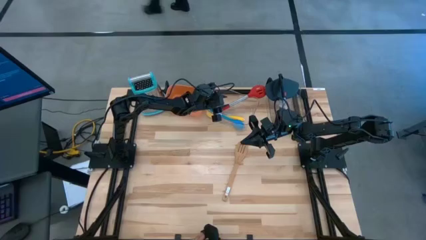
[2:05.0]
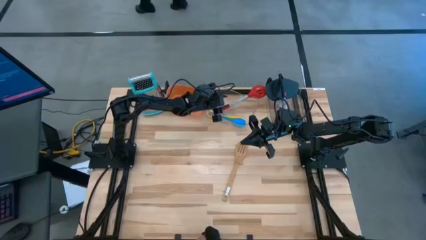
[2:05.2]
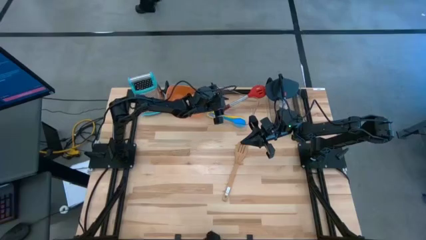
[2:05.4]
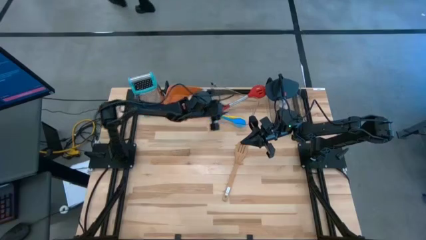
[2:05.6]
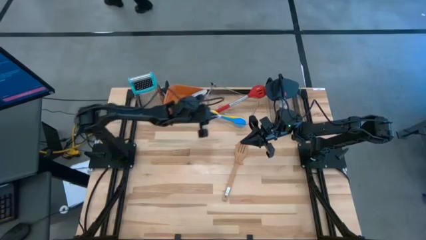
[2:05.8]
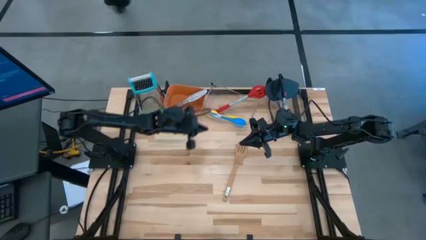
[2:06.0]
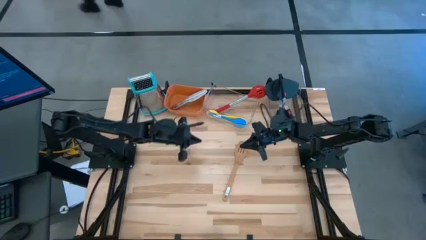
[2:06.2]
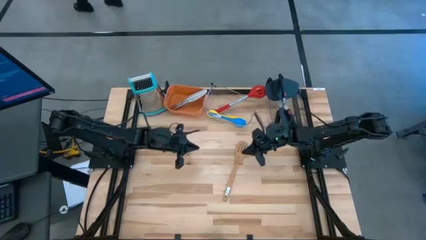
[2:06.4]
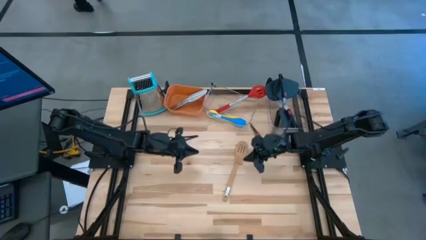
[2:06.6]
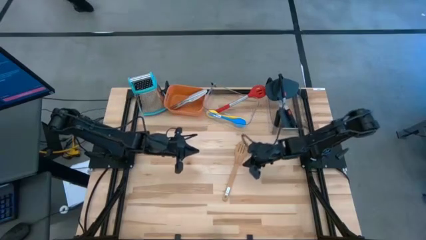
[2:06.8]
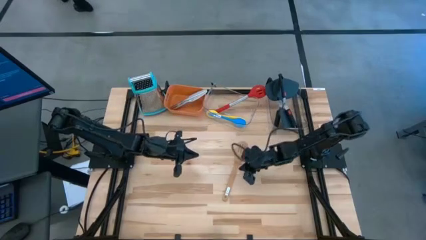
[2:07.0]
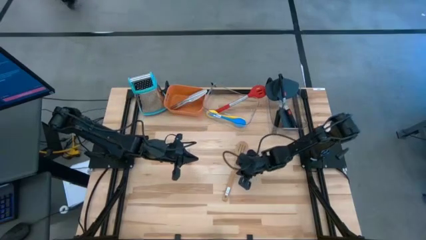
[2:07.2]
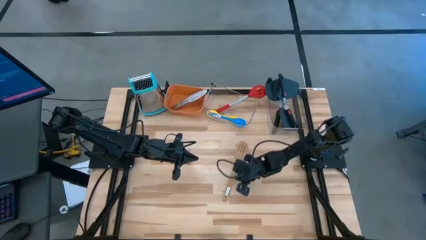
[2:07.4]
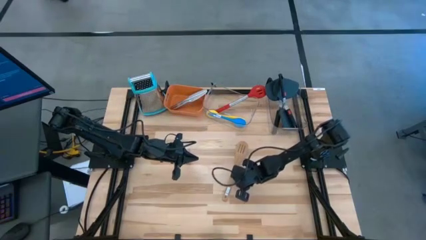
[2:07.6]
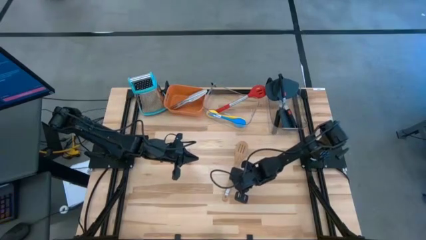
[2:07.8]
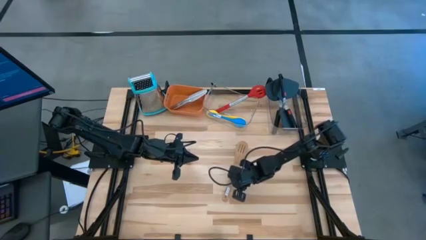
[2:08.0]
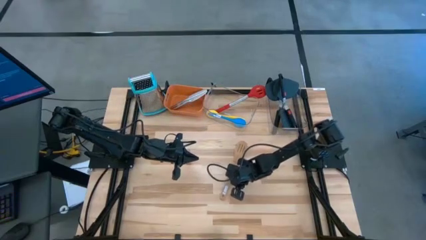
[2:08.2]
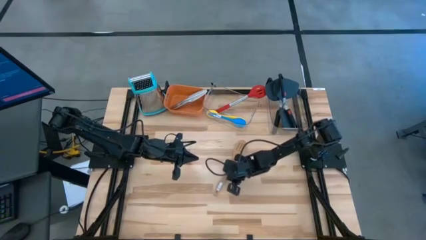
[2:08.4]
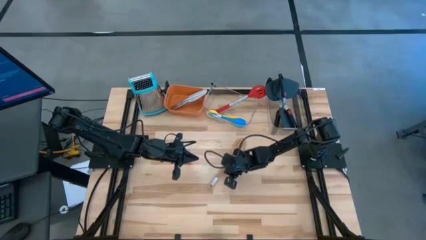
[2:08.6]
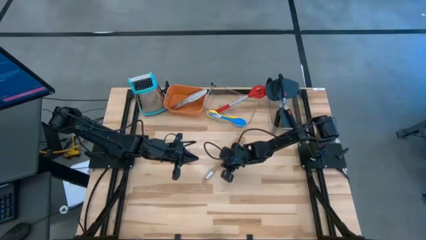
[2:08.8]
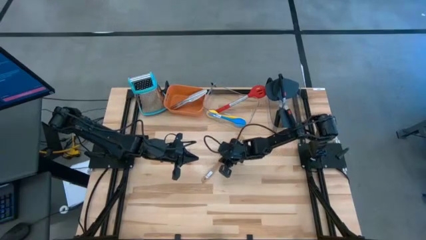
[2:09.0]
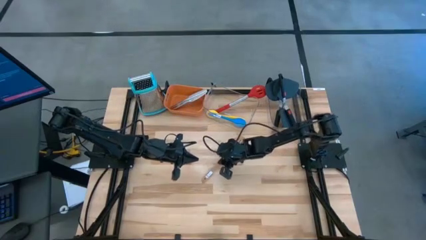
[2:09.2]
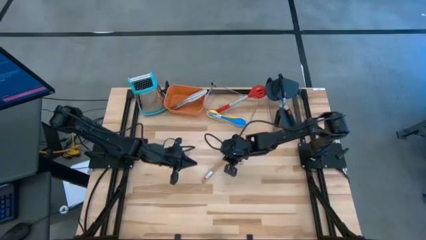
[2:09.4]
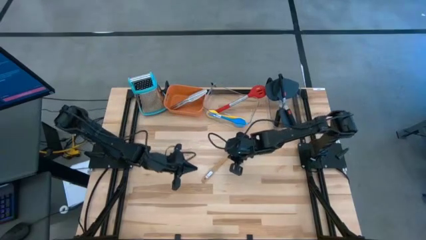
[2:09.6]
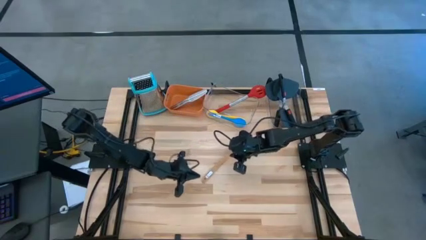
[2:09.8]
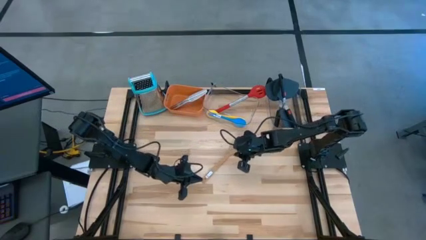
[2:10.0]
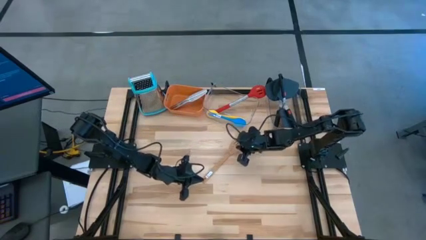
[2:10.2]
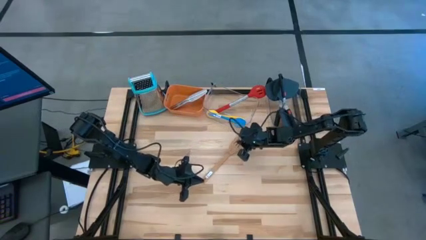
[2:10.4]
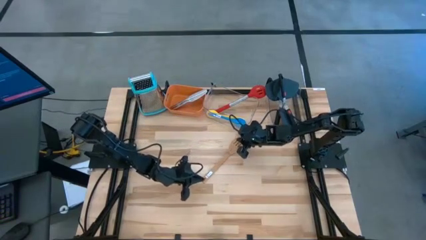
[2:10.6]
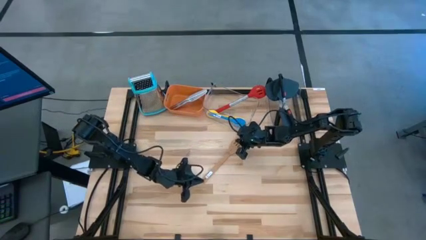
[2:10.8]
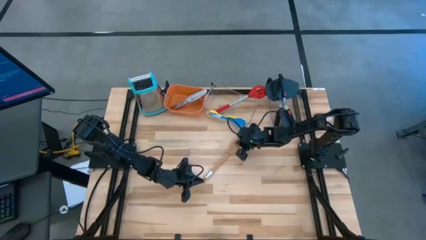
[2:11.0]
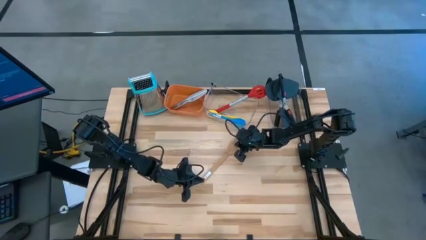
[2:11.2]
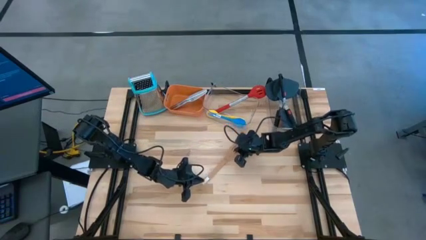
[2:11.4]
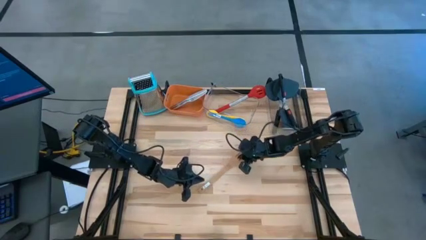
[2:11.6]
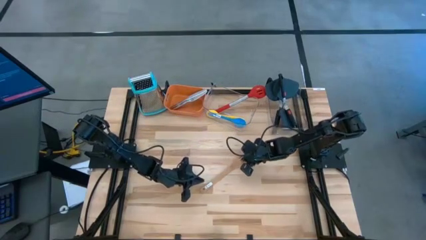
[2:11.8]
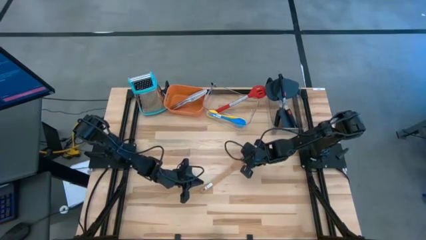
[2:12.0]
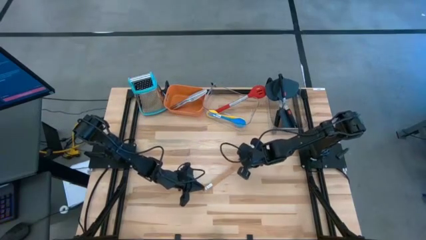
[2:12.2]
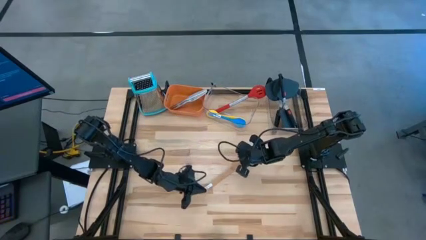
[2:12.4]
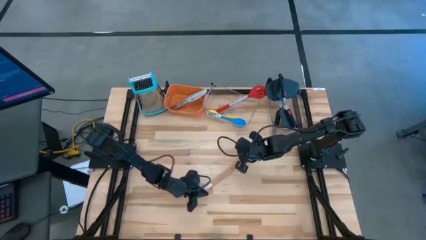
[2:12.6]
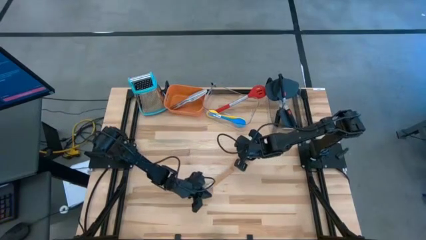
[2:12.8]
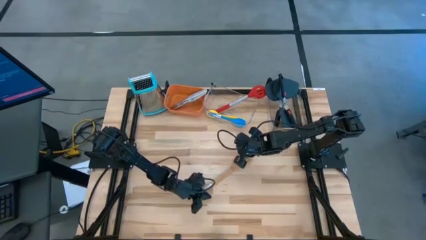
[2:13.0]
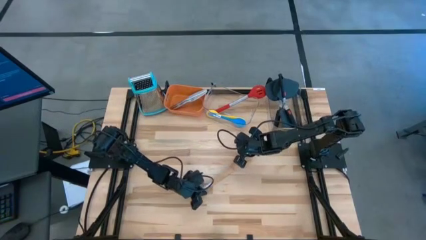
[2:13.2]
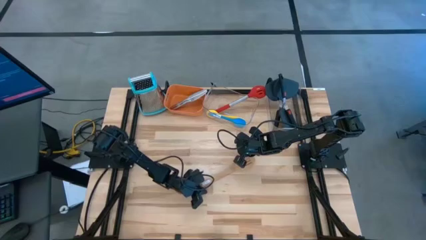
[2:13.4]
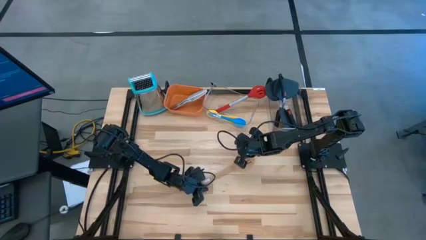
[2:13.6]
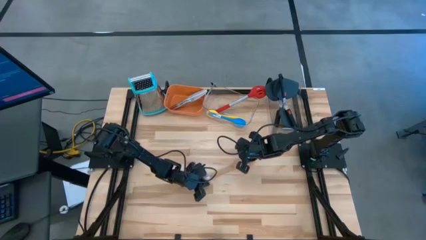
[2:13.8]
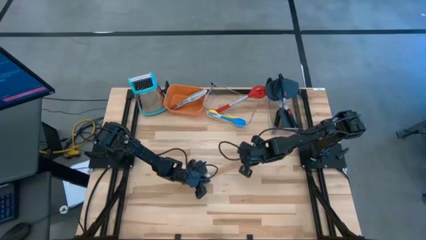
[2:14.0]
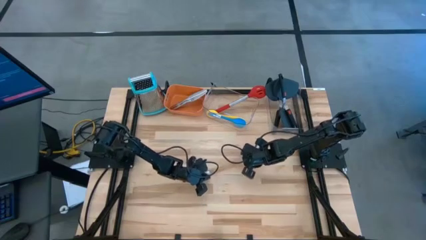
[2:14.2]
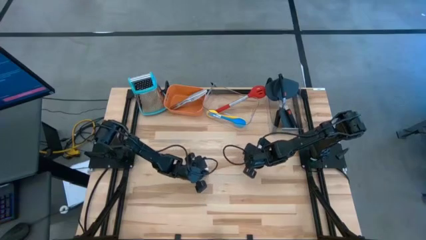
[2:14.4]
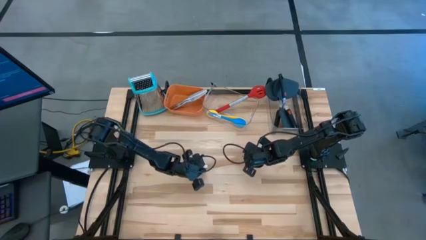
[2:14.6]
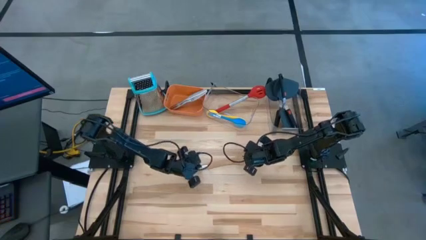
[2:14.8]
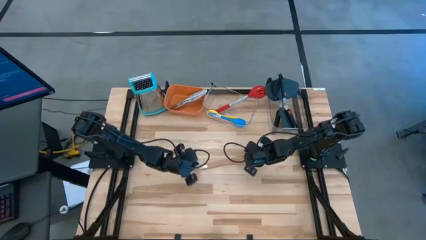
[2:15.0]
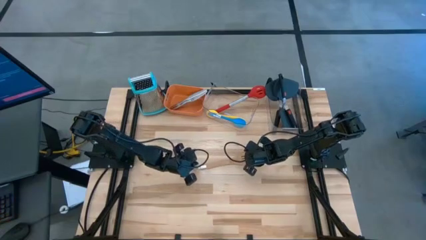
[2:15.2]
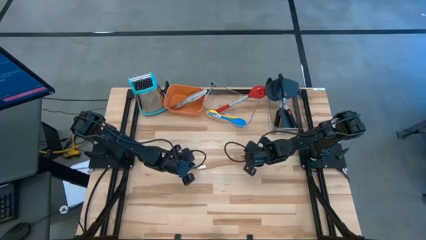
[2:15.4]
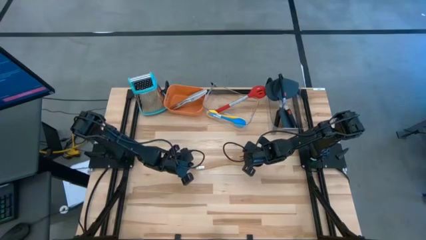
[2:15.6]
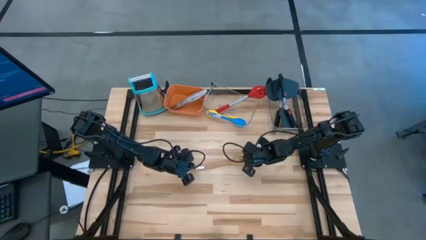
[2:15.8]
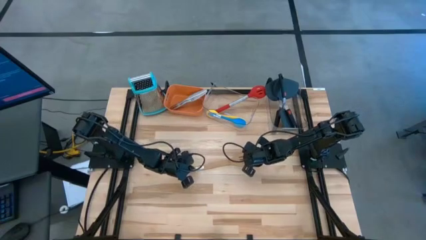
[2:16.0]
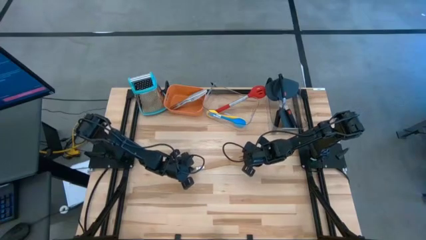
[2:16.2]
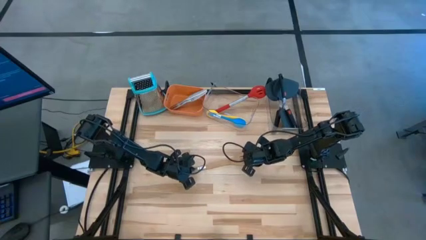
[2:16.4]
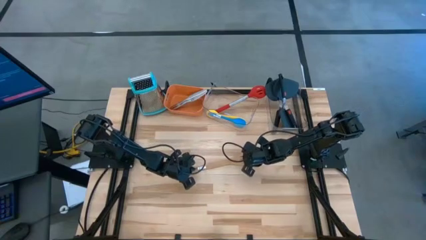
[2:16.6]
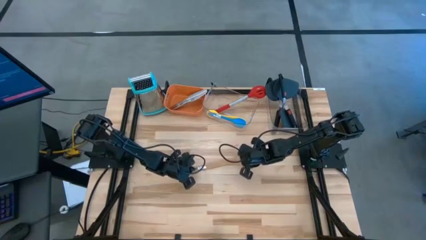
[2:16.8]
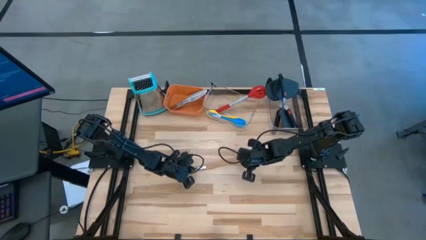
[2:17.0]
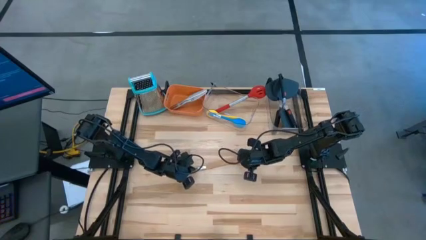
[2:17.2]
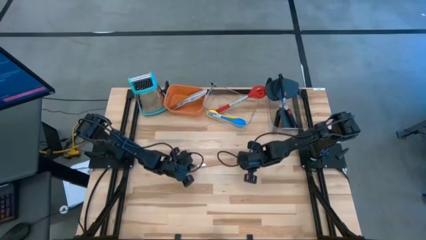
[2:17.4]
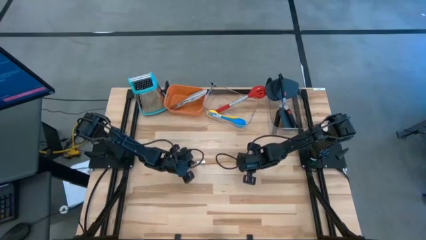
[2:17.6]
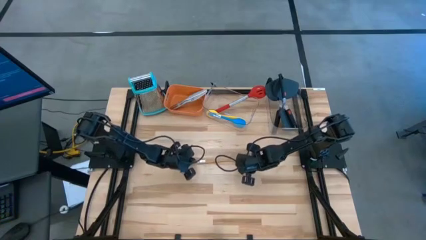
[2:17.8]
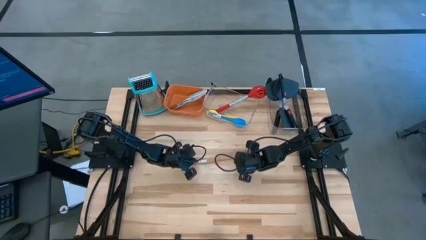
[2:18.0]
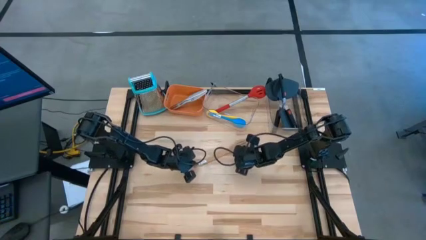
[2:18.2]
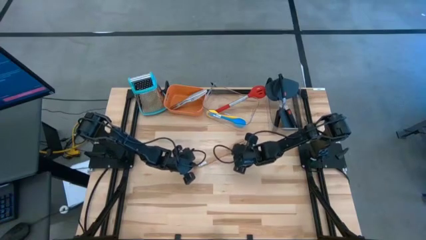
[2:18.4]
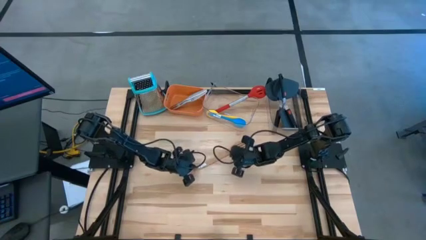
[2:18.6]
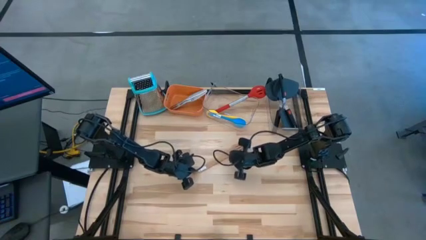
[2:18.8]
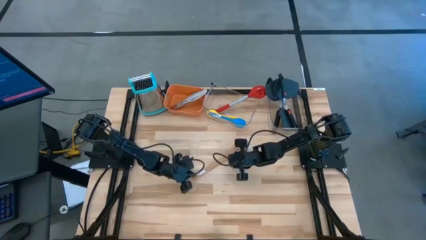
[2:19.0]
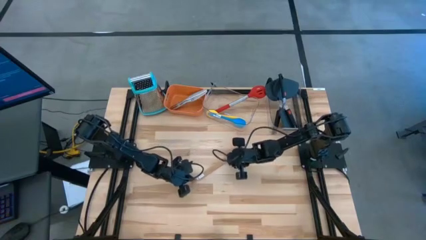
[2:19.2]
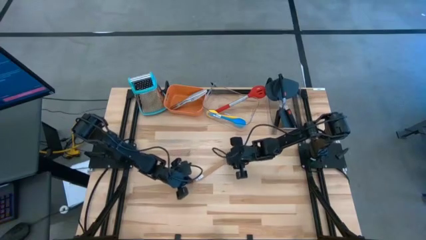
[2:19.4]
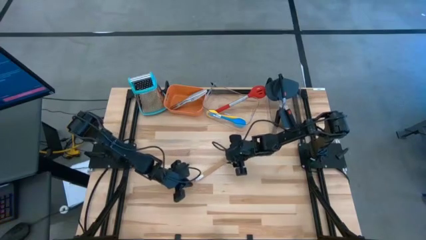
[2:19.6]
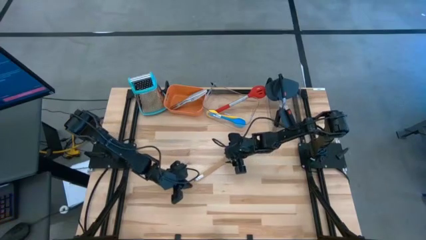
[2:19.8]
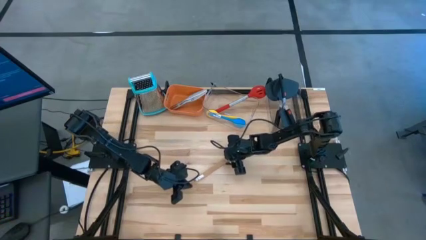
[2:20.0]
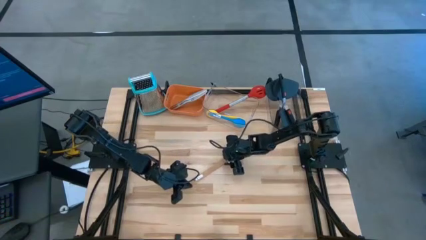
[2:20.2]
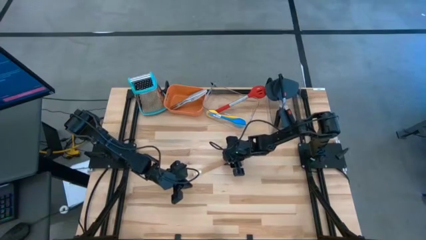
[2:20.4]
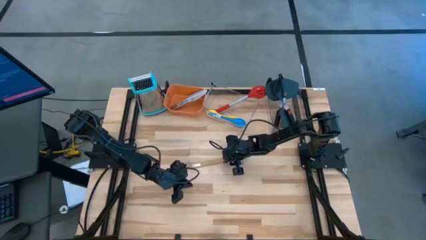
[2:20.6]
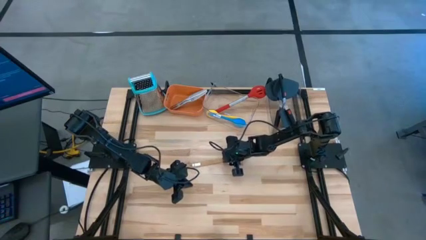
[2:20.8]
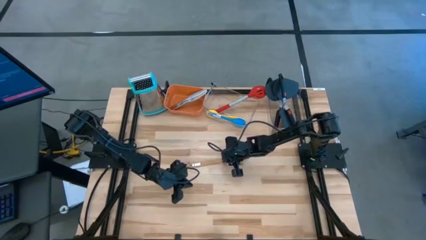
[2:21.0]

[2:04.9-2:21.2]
Task: Pick & Place Kitchen Items
Put the brown serving spoon into the left transparent bin

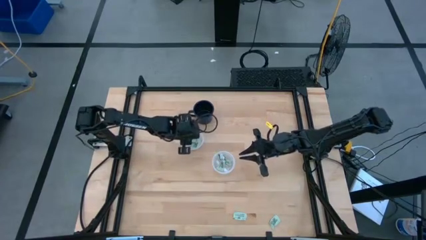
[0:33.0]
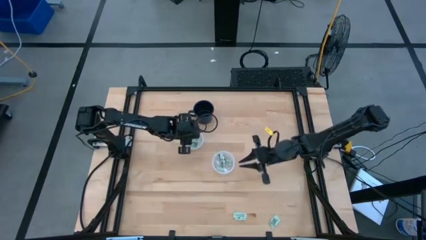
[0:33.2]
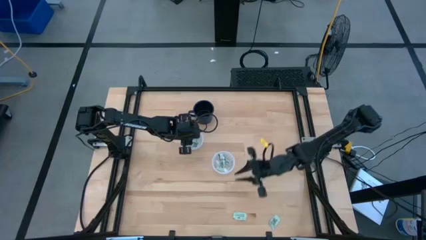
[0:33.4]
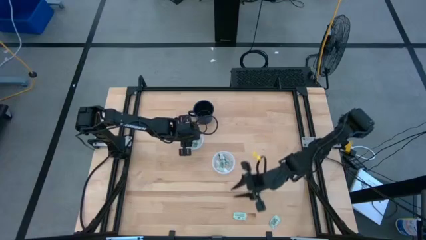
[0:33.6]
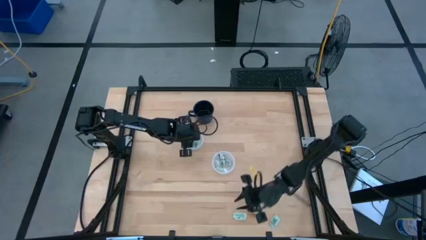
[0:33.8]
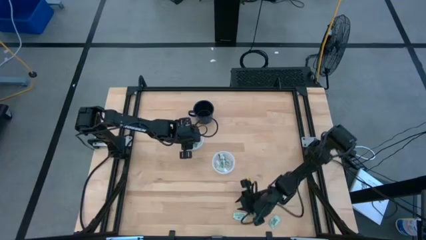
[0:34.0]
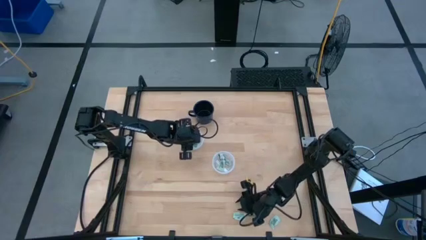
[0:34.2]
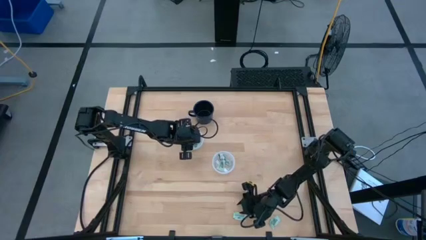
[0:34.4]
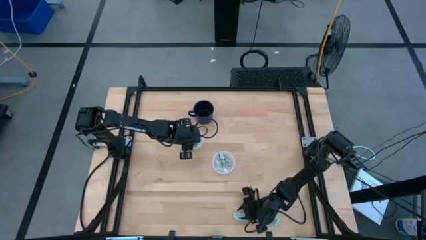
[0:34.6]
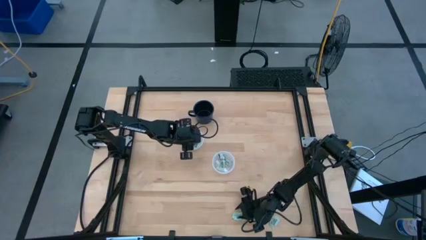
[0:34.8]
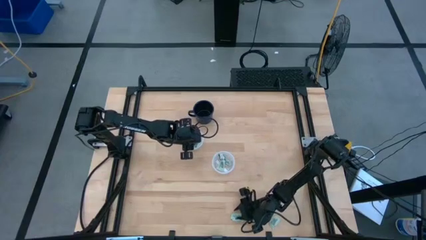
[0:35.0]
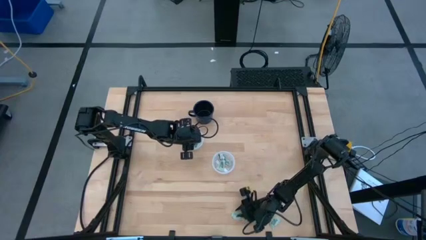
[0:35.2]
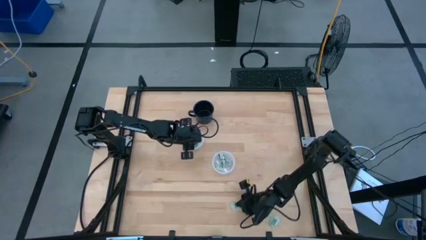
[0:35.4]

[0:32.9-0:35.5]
Task: Pick and place Stevia / Truvia into bins
Put the stevia packet into the bottom round transparent container
